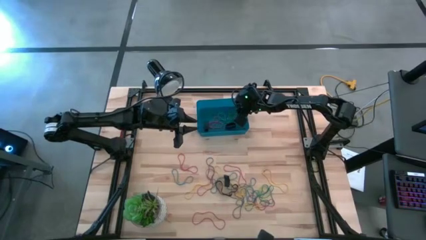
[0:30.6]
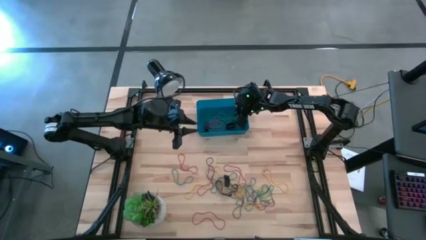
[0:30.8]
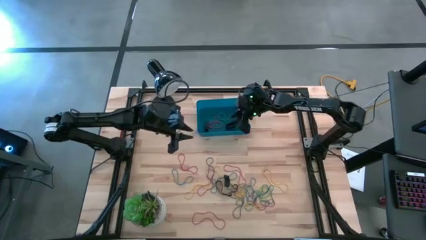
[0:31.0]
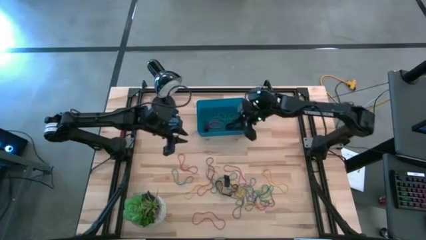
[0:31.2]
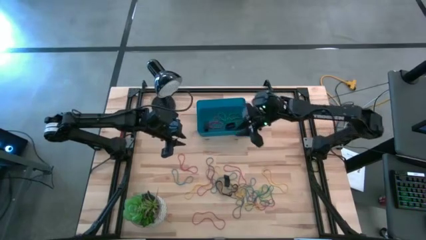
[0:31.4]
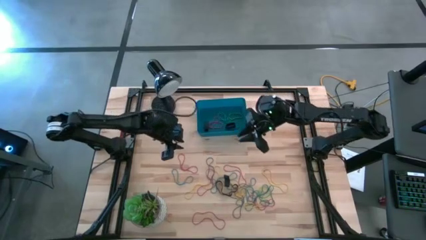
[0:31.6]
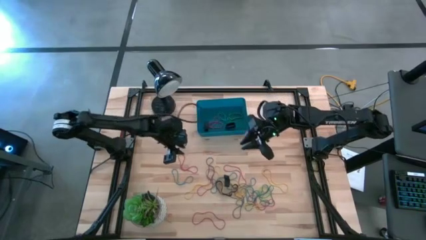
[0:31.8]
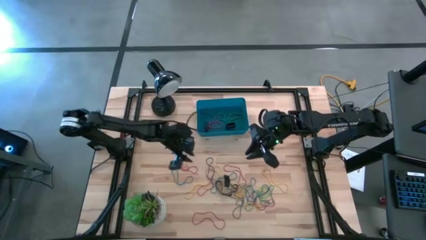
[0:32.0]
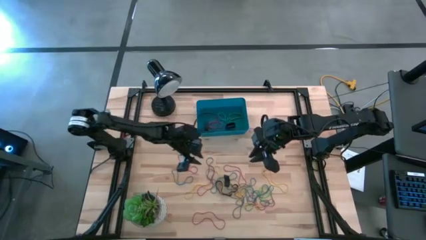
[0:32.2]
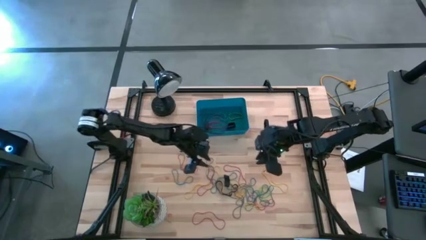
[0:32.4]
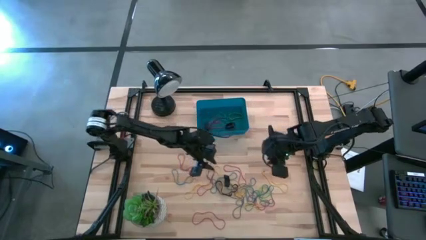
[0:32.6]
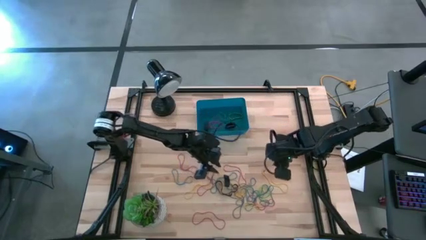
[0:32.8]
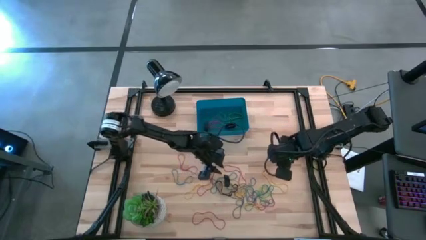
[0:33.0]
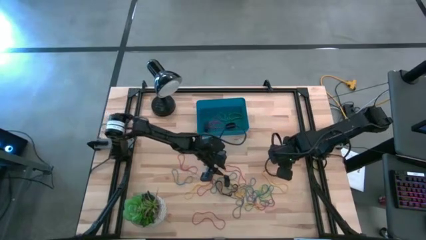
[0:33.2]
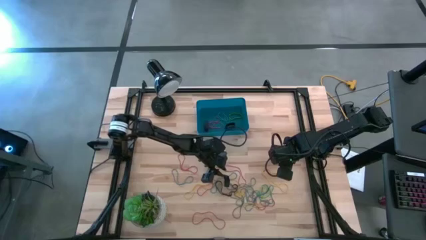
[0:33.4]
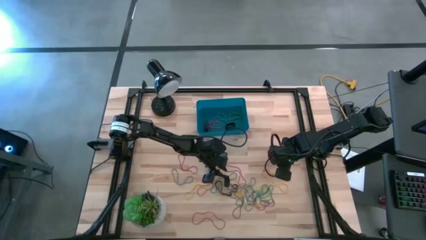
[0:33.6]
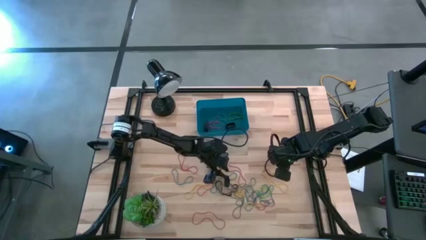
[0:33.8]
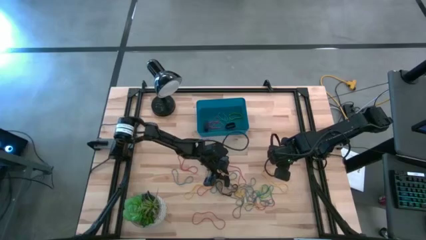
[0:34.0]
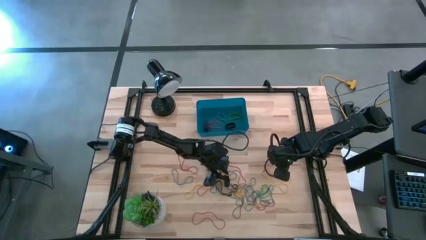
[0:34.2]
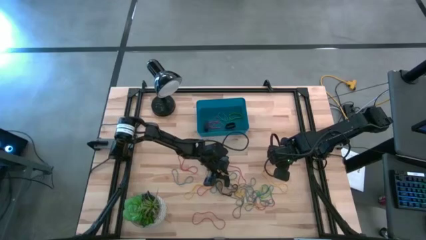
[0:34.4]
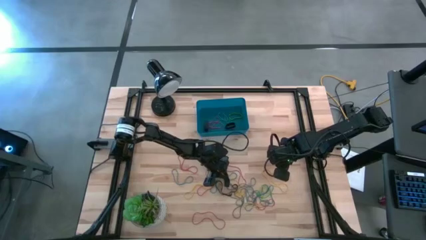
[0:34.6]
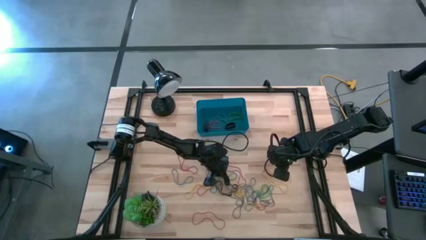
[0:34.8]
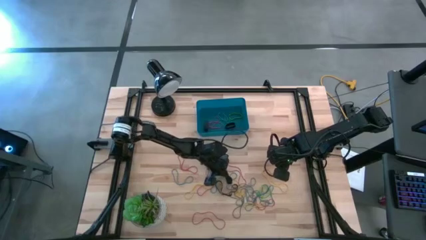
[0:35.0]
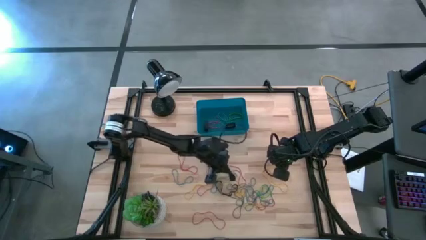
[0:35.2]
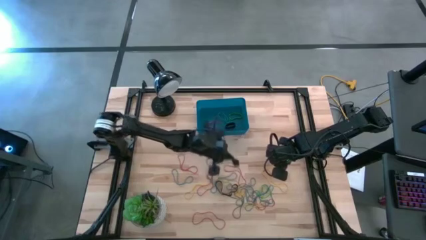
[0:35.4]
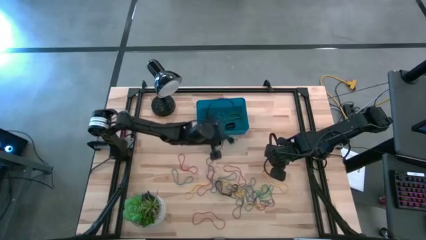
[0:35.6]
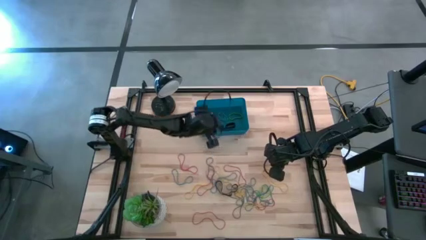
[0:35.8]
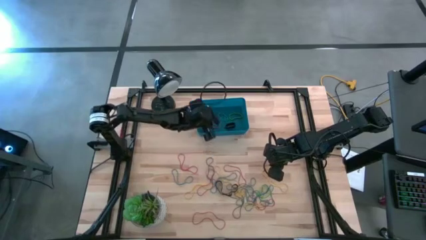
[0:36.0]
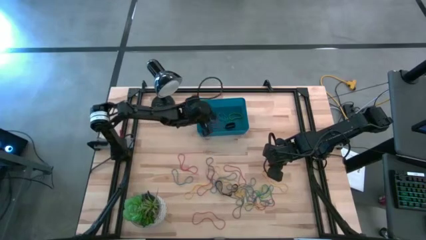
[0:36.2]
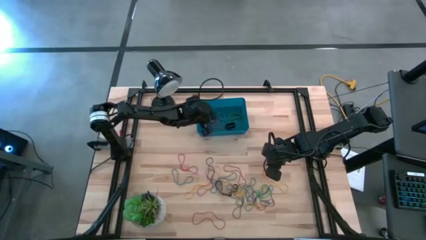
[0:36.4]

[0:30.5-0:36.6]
Task: Pick and place rubber bands into bin
Put the black rubber band into the blue bin

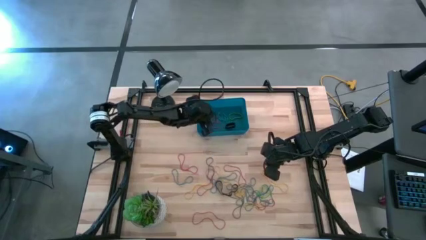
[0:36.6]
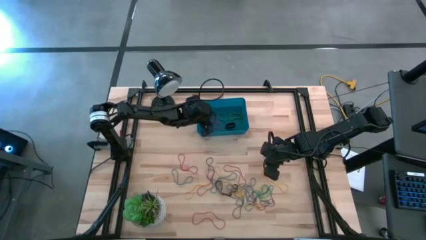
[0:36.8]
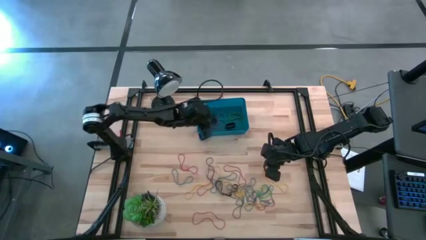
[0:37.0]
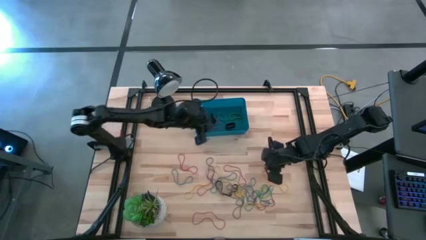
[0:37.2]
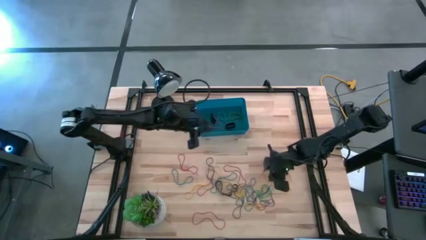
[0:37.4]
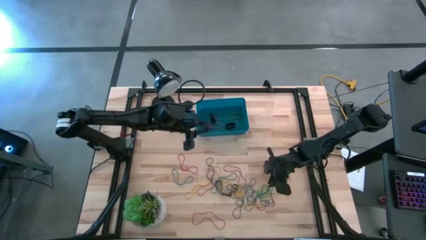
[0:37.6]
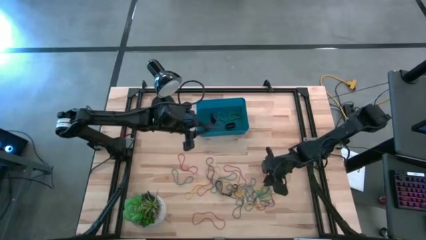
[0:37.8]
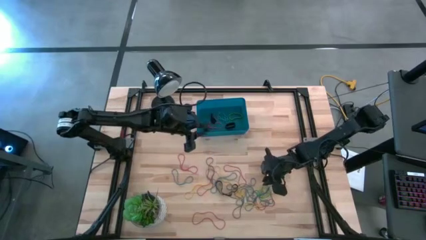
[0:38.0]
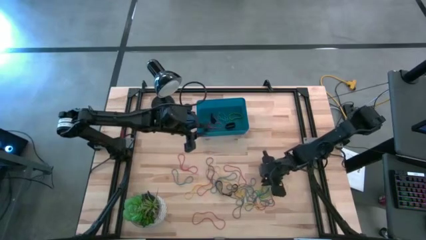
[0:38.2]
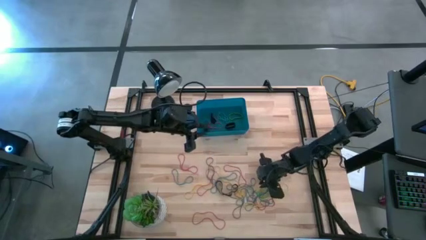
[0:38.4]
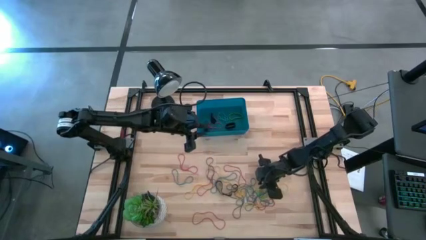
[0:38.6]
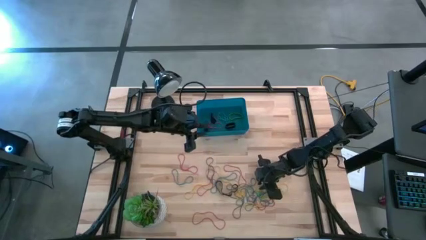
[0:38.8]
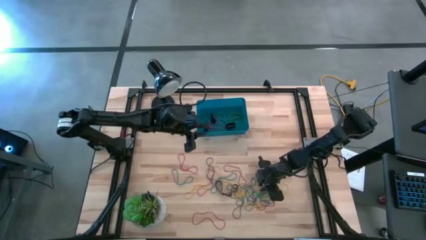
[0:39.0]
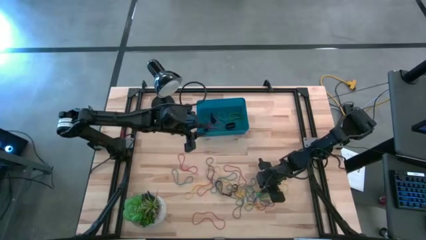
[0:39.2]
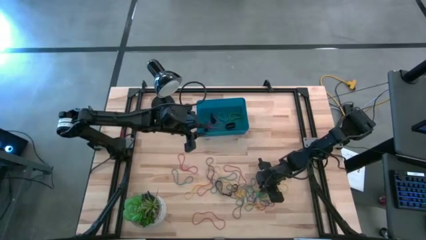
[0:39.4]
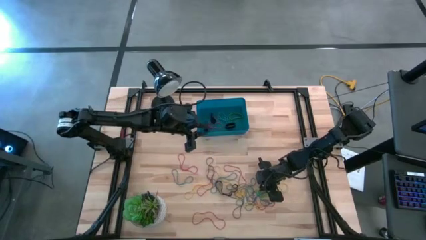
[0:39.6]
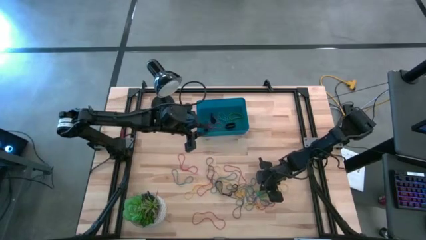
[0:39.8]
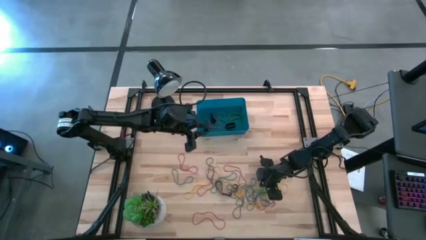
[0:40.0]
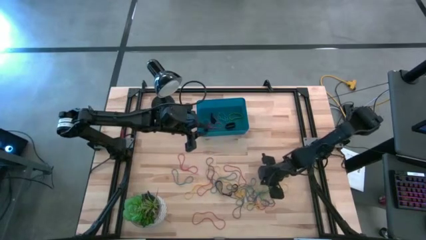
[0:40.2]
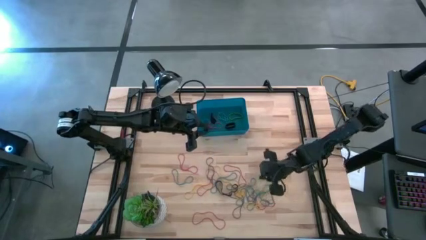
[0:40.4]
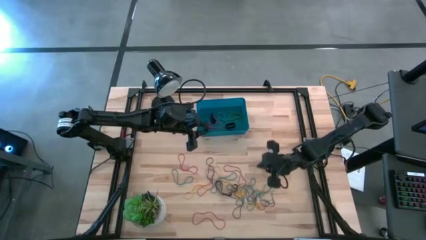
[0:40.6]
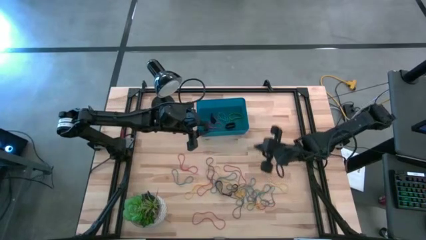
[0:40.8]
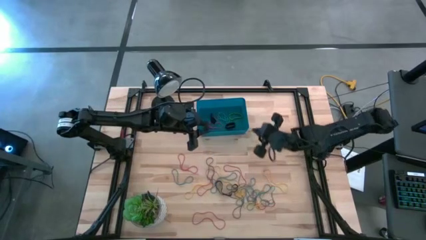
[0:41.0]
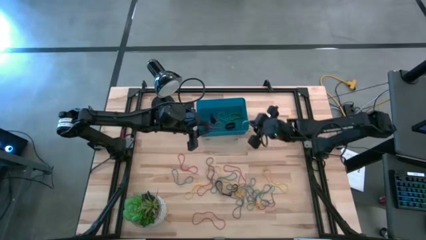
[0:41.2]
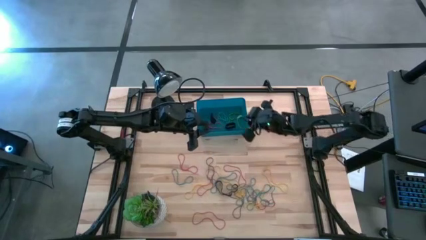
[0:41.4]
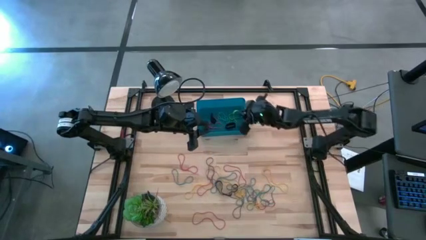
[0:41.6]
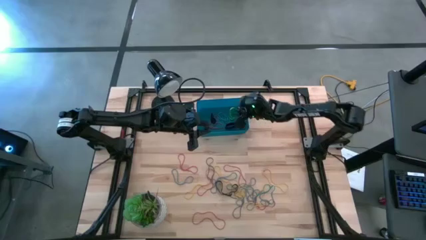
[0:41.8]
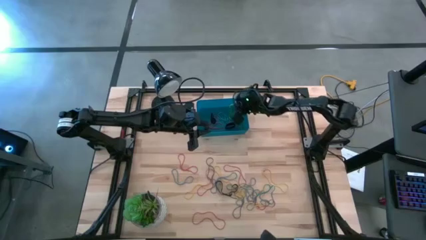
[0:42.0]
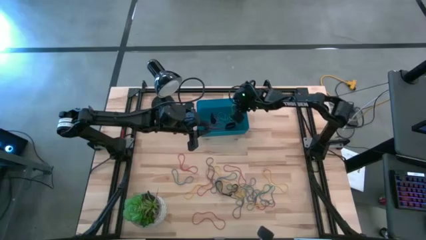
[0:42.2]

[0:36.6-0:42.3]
Put the green rubber band into the blue bin

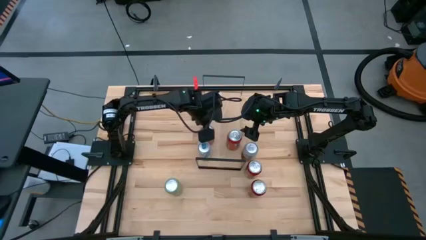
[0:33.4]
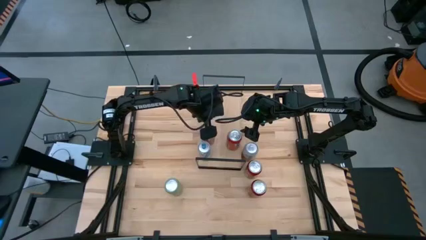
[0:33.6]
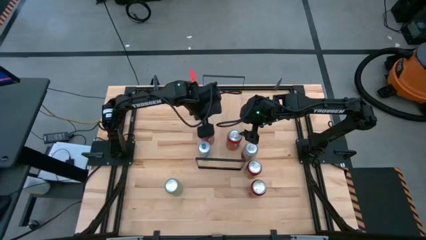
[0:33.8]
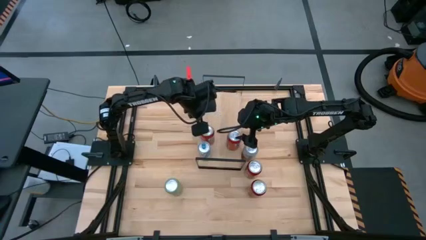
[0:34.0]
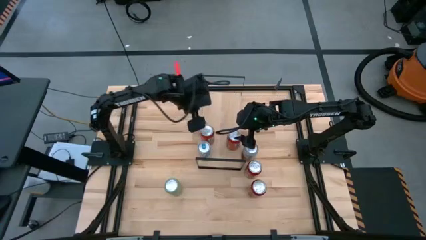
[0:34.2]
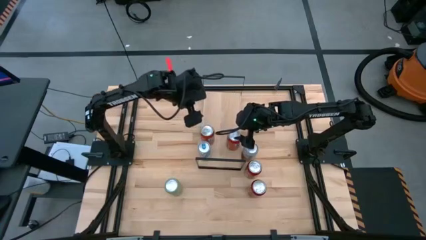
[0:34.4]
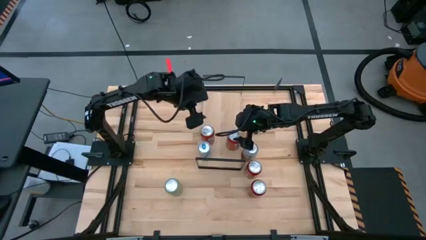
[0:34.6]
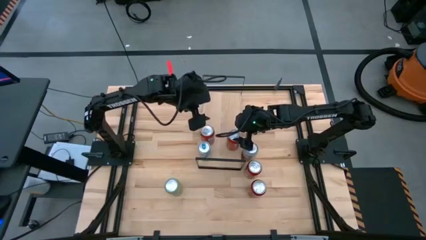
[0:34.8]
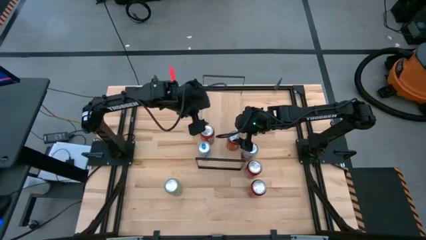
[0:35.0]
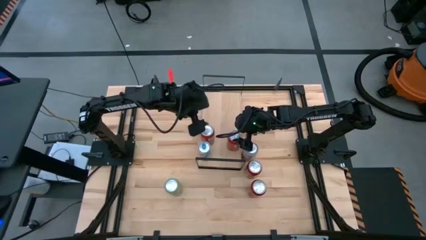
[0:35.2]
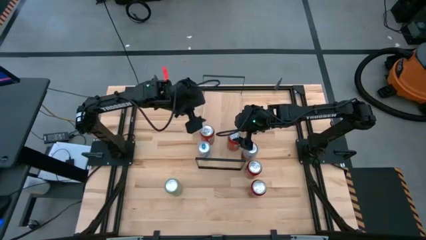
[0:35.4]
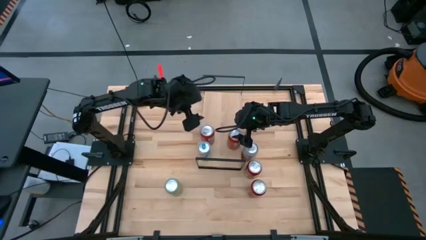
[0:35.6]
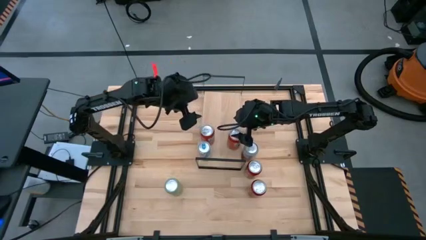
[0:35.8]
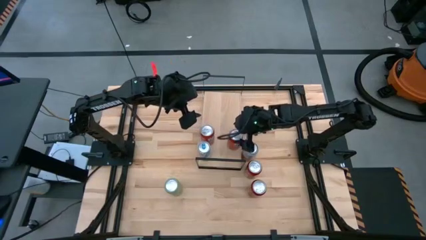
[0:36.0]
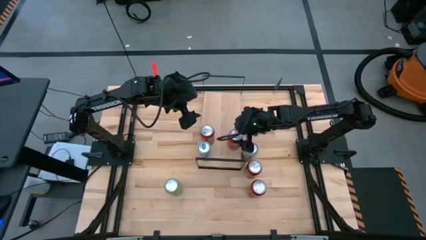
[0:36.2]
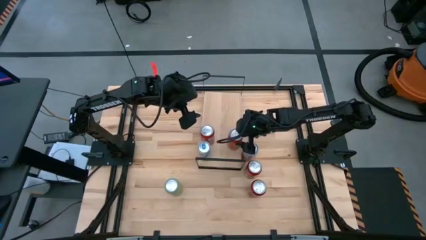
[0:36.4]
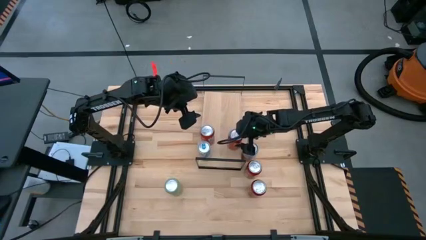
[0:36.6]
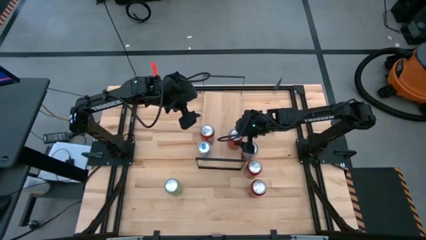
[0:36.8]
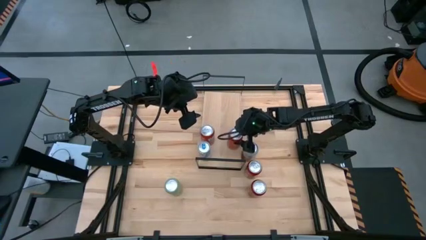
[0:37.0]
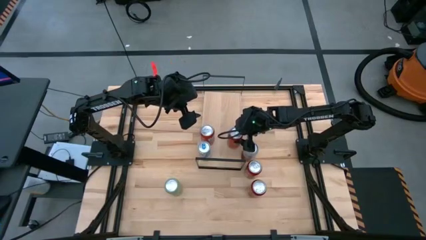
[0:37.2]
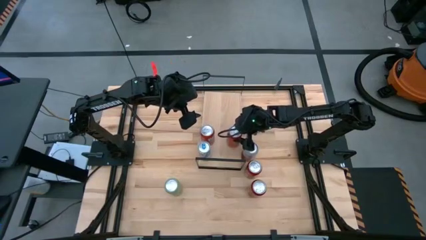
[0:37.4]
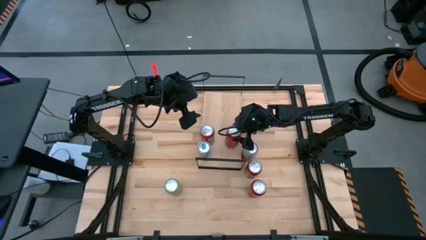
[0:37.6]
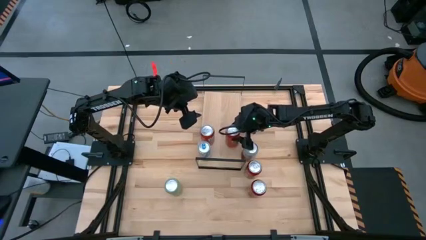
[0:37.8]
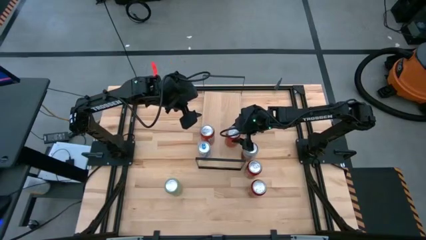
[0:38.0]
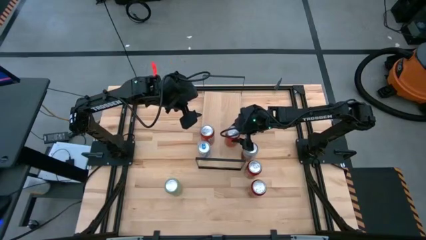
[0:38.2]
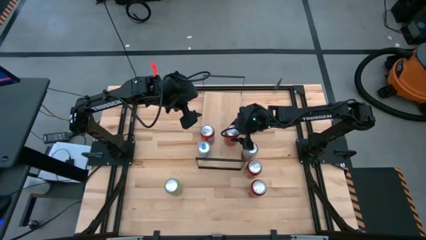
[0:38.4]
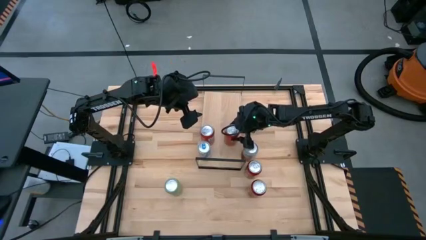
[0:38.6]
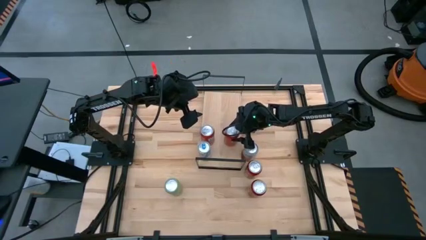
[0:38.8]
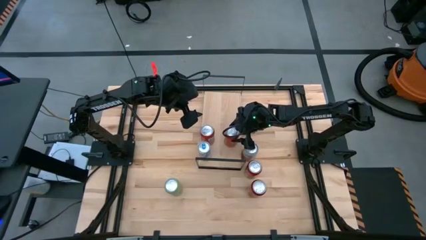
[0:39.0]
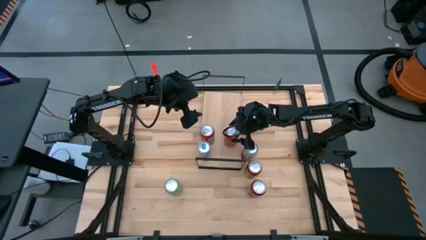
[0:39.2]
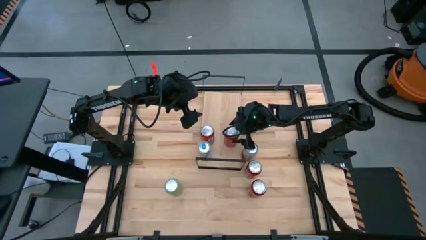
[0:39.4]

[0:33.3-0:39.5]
Task: Place canned beverage on shelf
Adjust the right red soda can on the shelf
